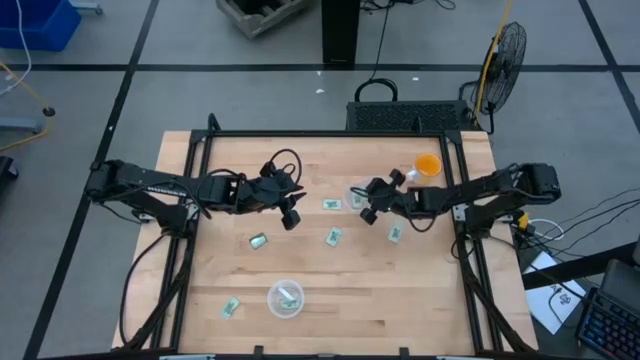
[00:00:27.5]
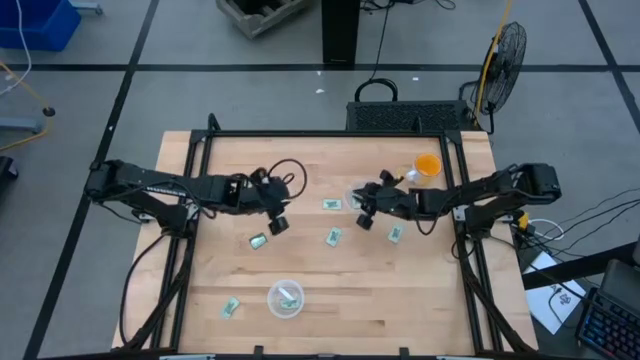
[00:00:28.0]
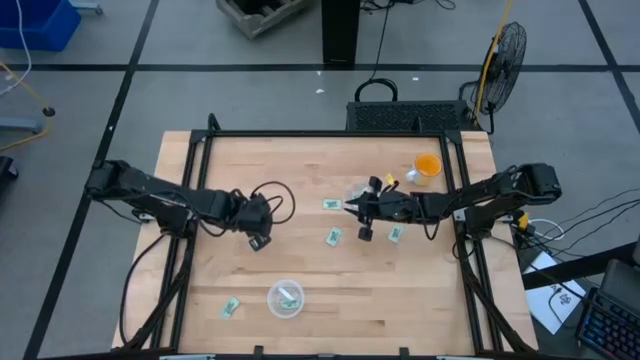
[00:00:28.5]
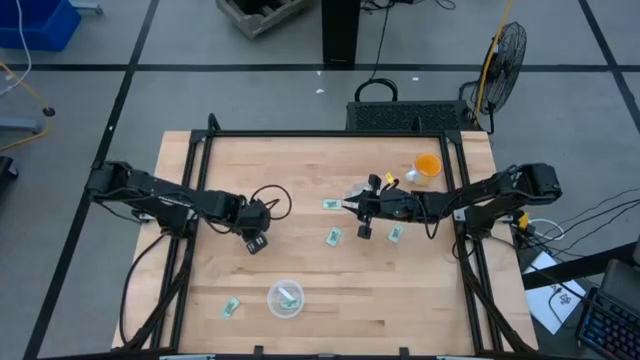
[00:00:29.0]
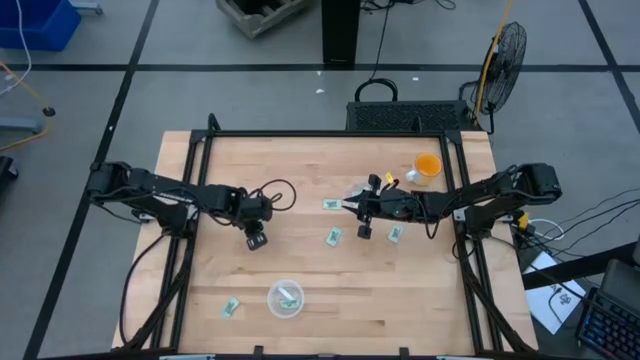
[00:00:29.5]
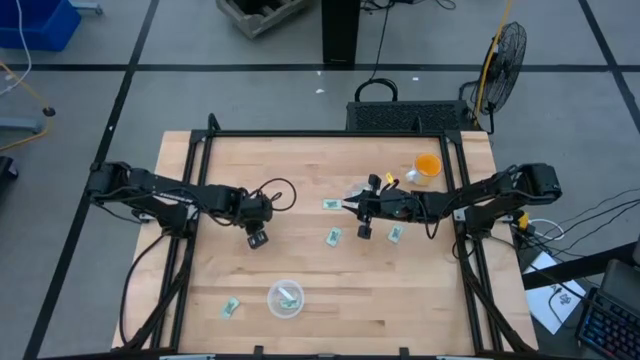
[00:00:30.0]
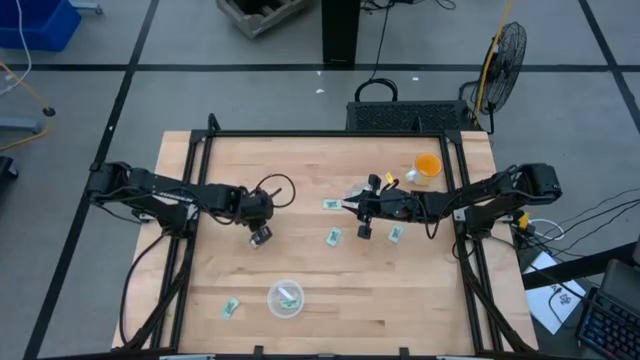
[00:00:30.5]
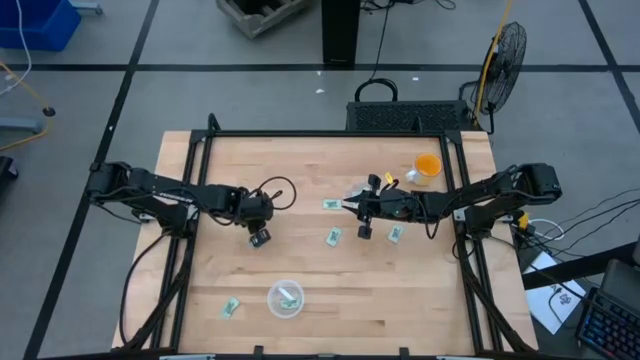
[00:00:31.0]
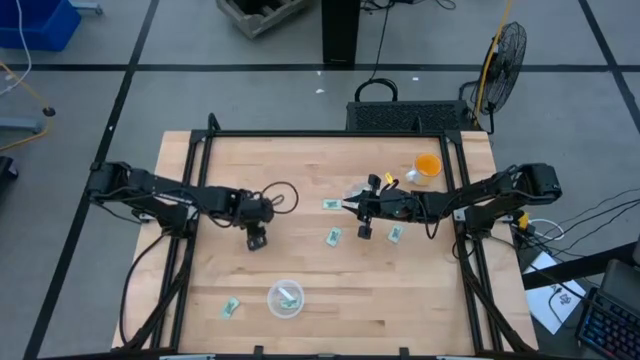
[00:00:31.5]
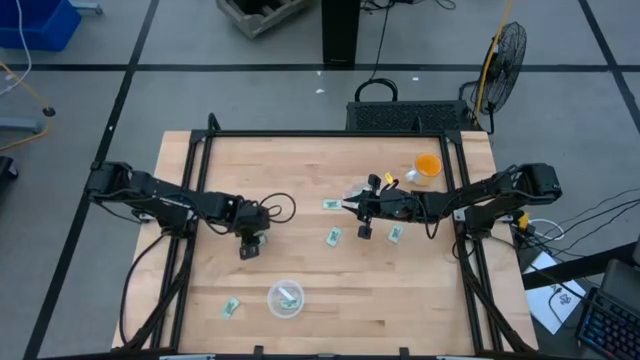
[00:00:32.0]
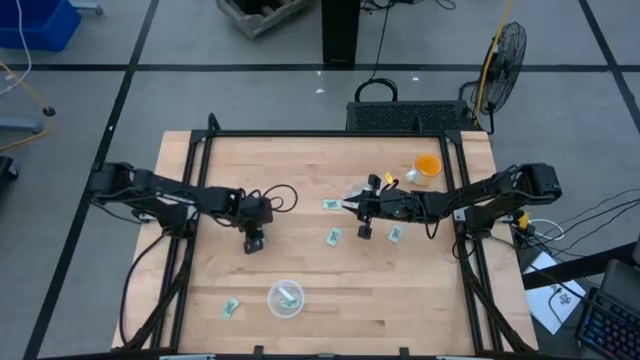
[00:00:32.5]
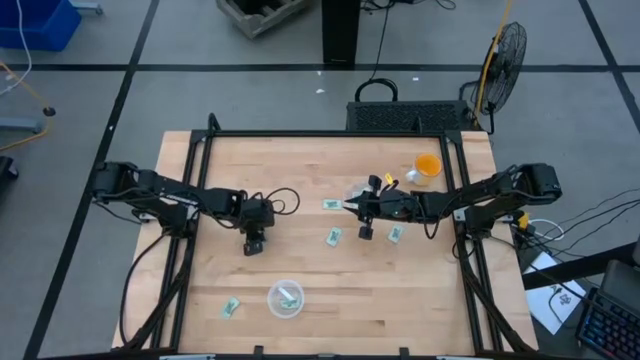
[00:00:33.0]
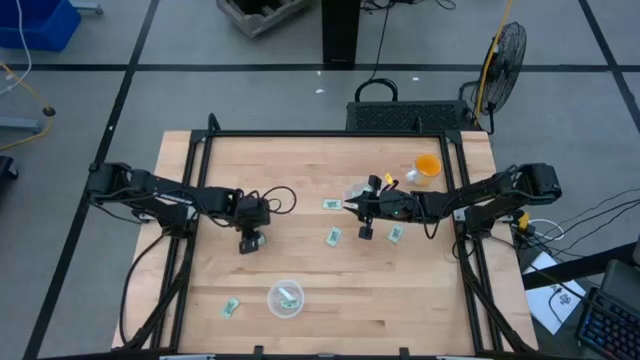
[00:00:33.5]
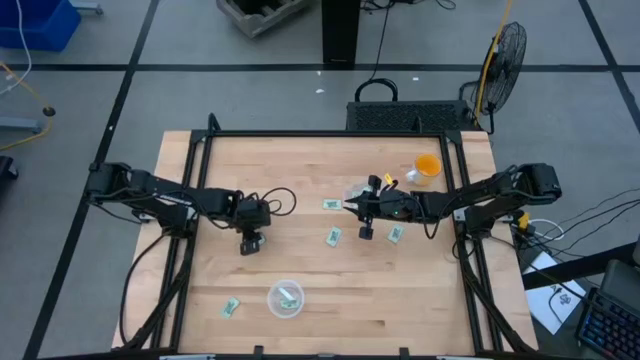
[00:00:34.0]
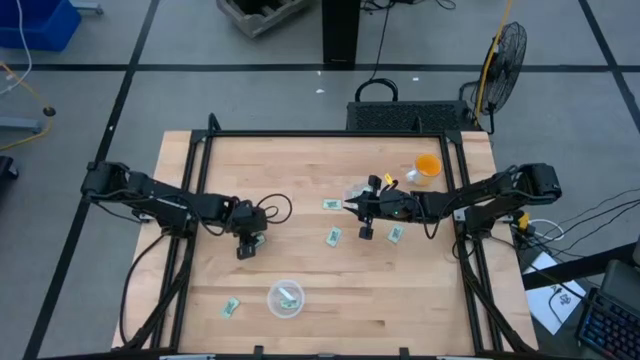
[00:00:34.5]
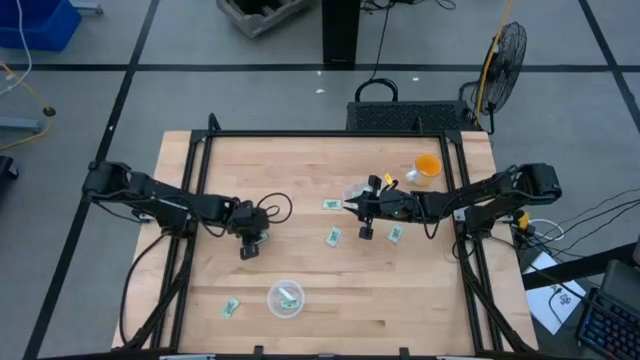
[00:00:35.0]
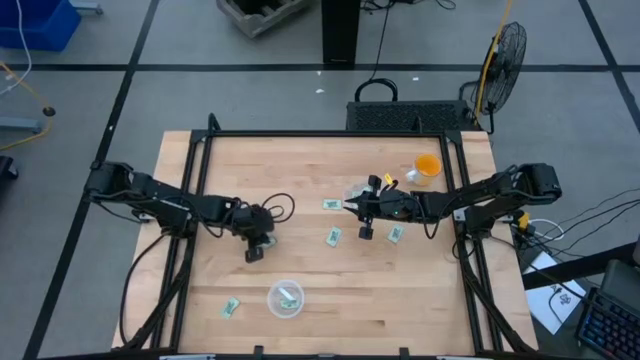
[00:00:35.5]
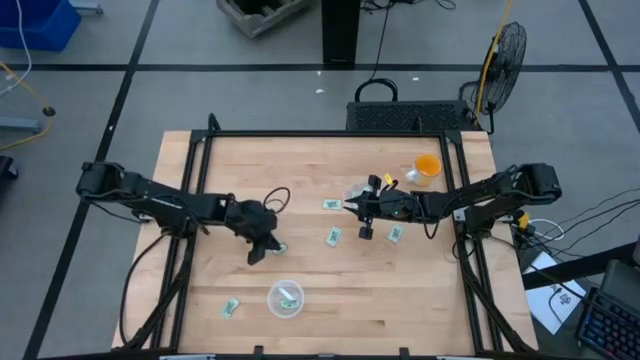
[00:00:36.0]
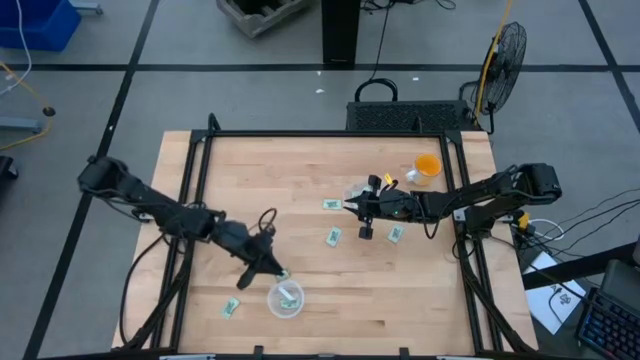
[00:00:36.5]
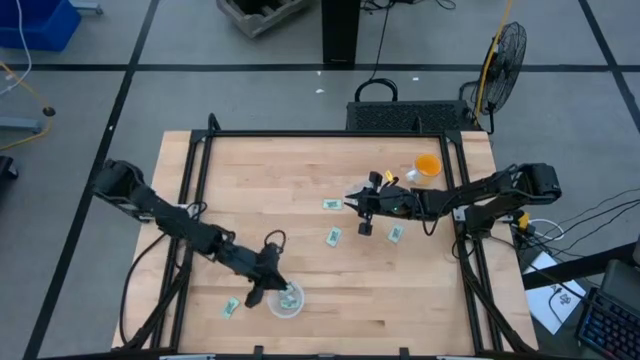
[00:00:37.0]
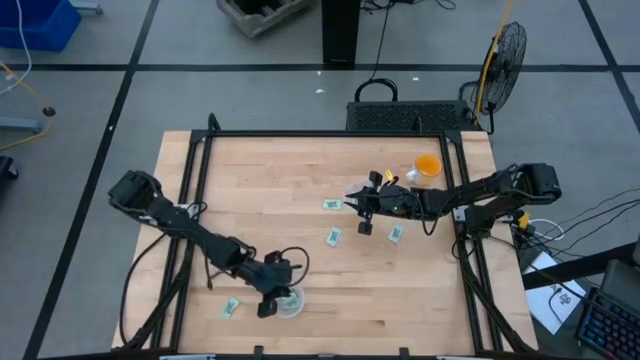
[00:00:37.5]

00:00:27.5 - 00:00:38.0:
Task: Pick and place Stevia / Truvia into bins
Put the truvia packet into the transparent container

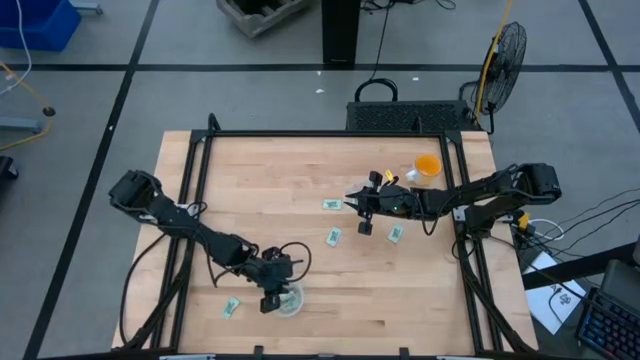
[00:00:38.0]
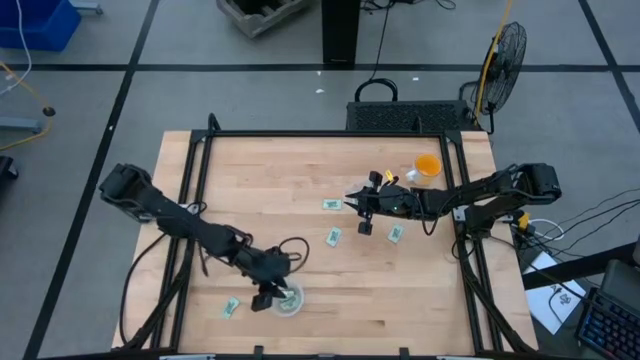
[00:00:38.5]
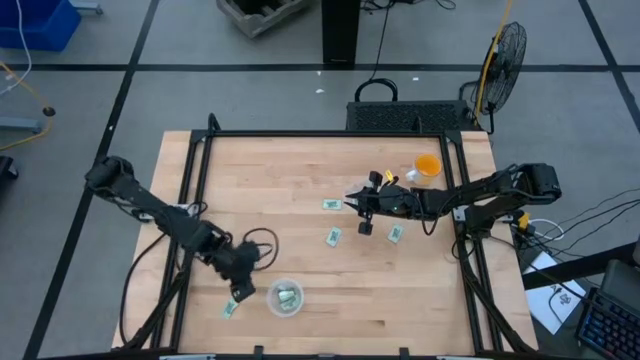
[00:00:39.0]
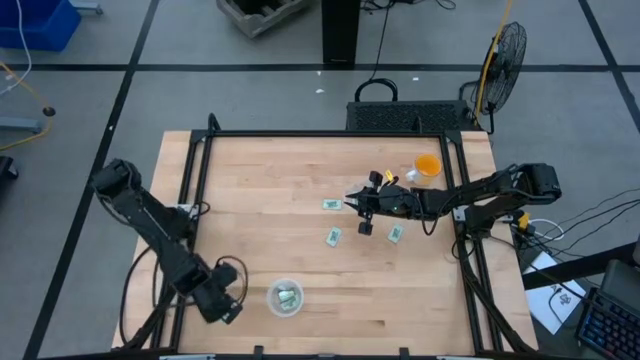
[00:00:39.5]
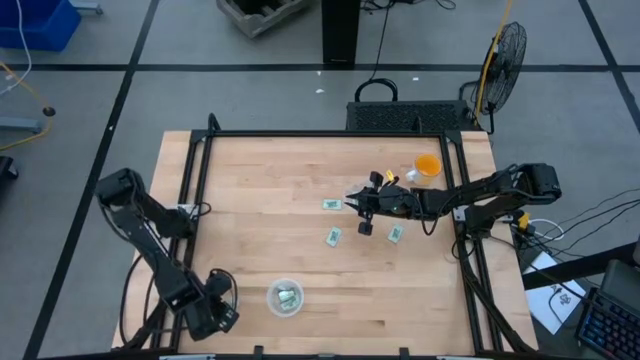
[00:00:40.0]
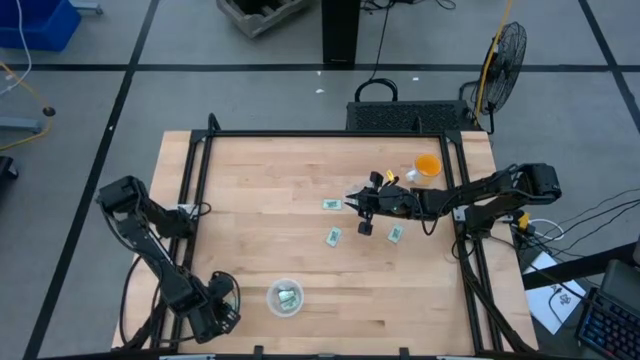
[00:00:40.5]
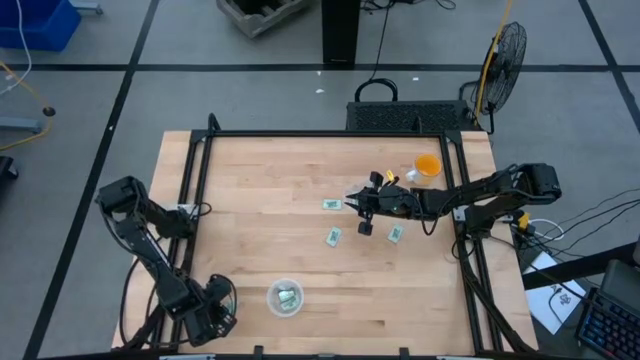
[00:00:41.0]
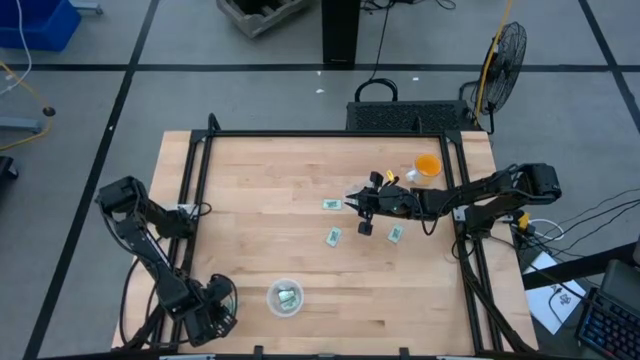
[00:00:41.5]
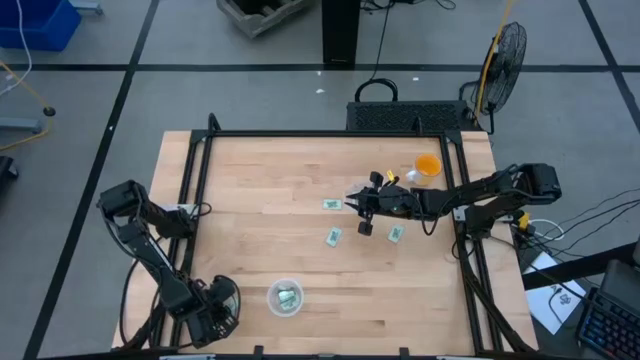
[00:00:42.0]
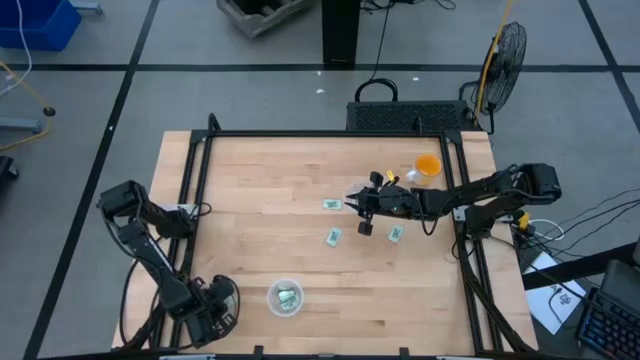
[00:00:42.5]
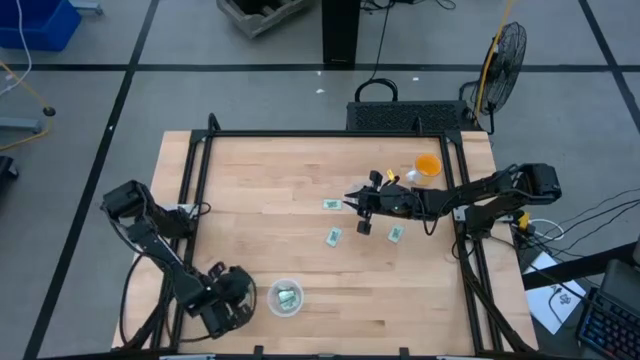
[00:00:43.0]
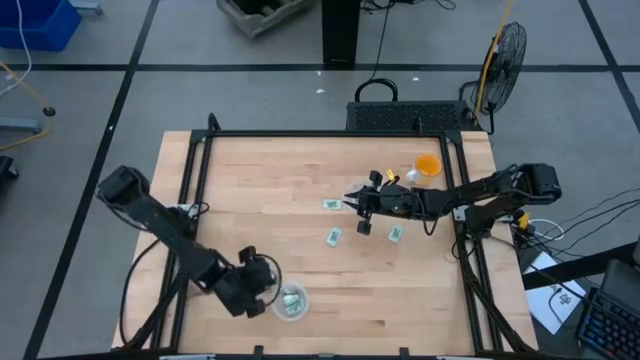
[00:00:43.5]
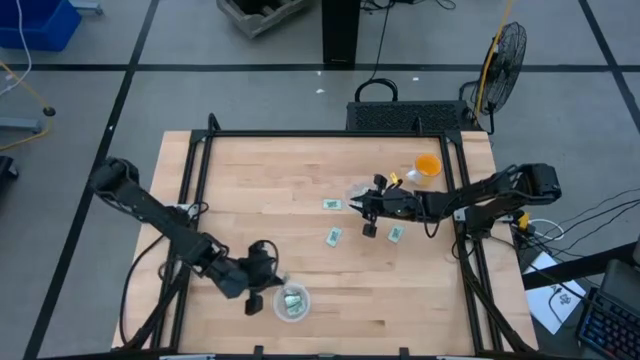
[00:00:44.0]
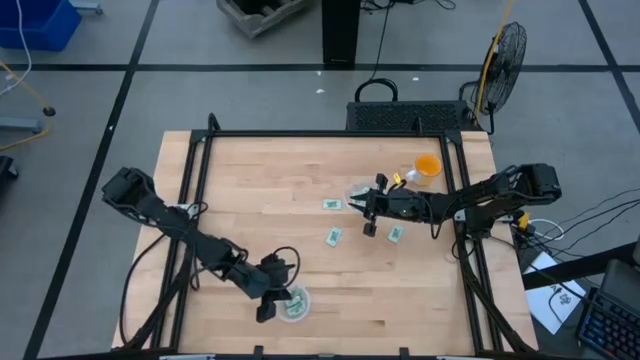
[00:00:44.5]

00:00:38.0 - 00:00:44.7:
Put the stevia packet into the transparent container

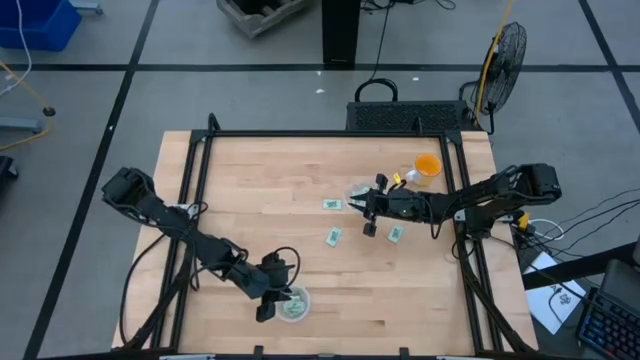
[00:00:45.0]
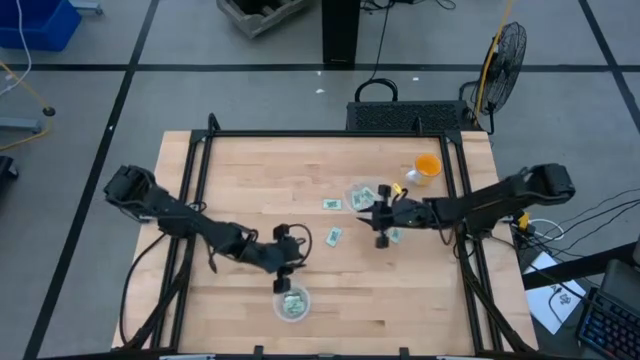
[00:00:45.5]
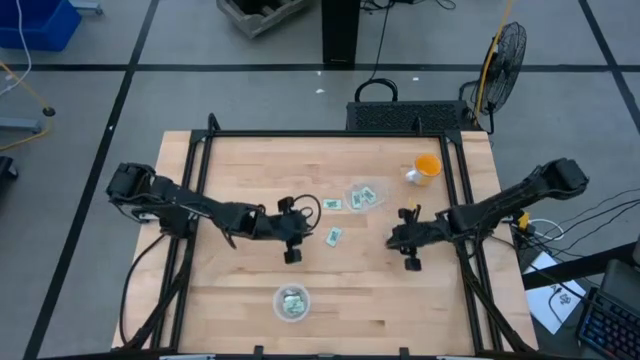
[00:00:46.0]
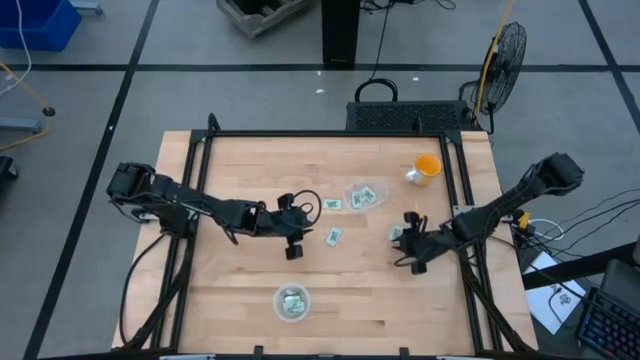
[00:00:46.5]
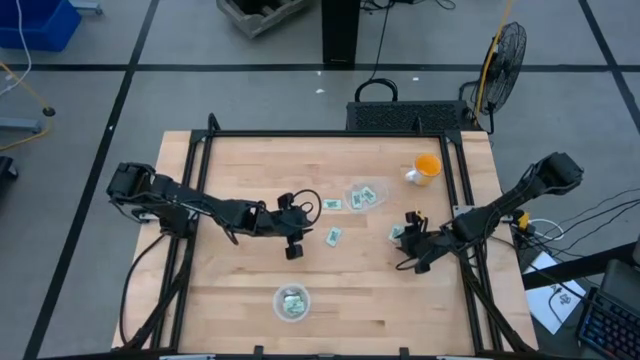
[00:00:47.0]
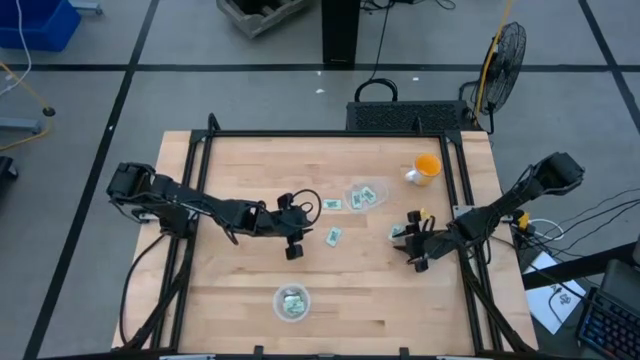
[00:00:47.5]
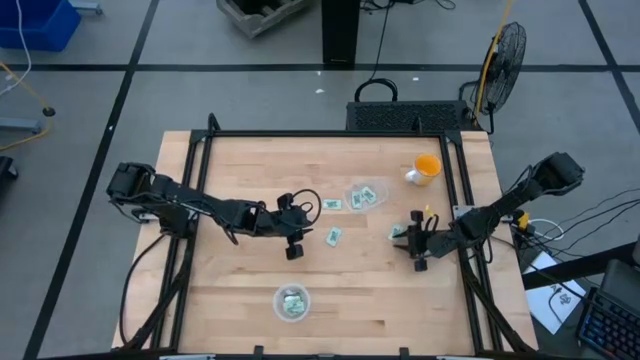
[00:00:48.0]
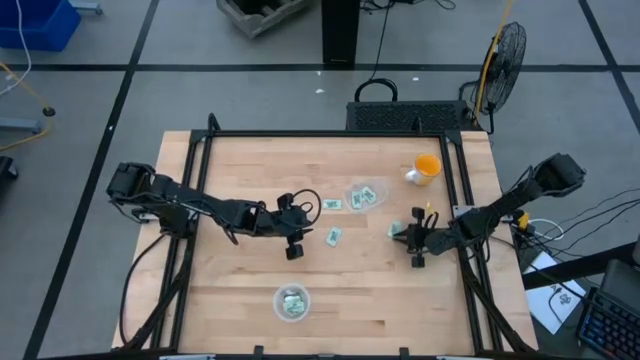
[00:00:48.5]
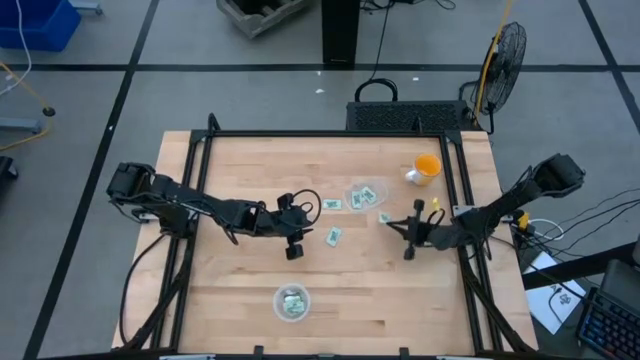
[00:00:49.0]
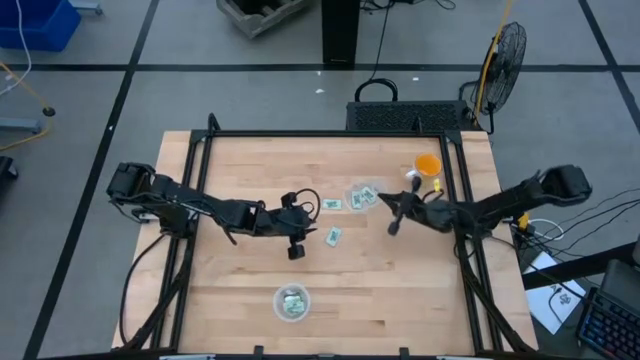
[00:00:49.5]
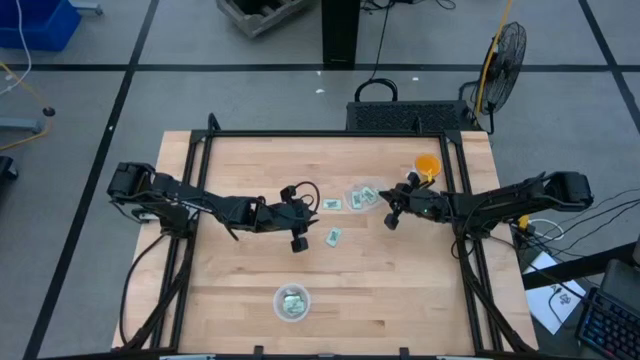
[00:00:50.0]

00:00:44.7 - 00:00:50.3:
Put the stevia packet into the transparent container
